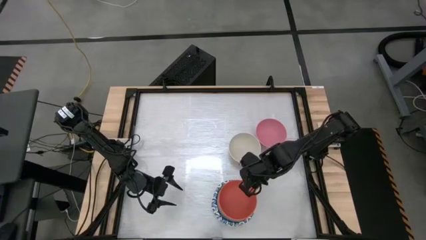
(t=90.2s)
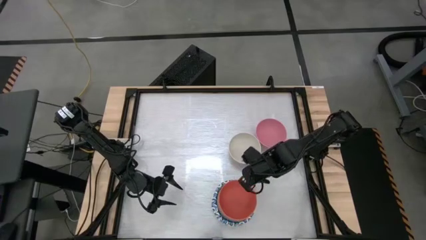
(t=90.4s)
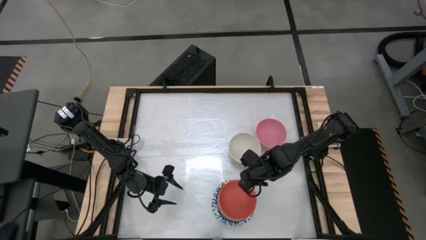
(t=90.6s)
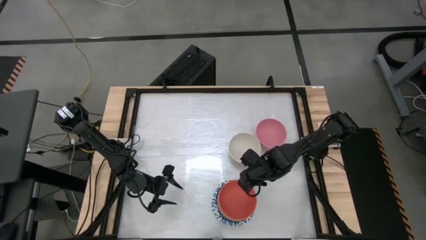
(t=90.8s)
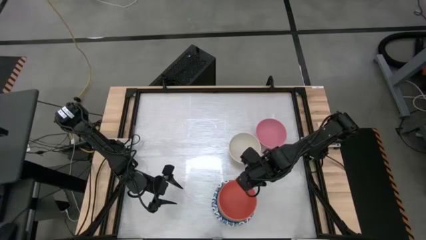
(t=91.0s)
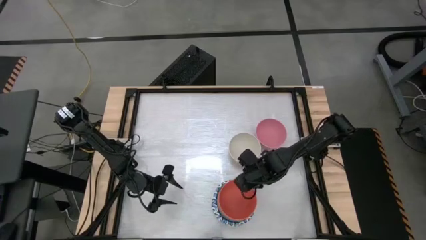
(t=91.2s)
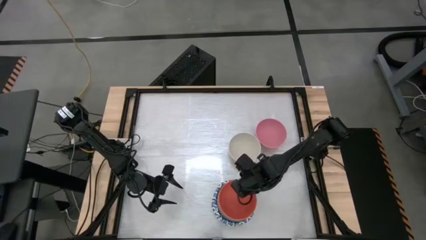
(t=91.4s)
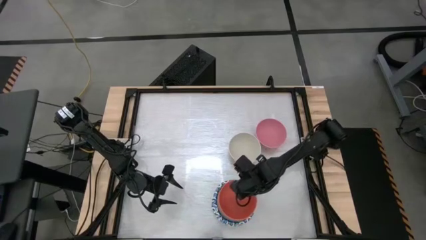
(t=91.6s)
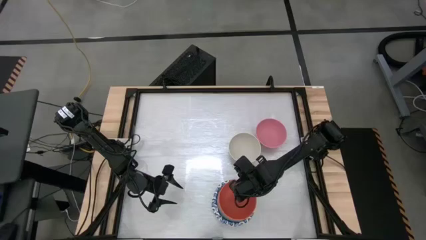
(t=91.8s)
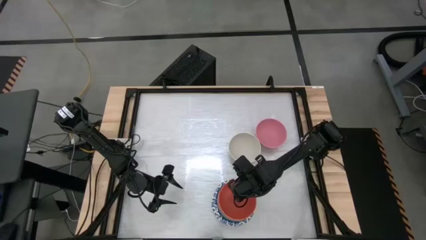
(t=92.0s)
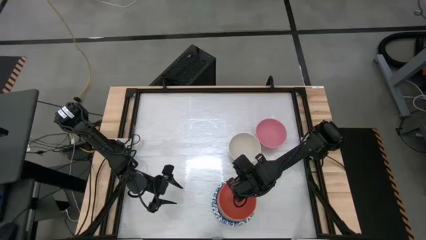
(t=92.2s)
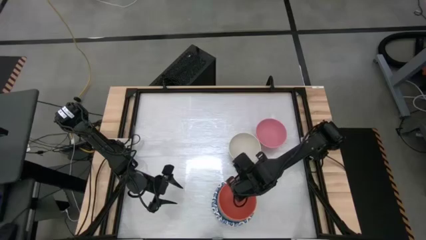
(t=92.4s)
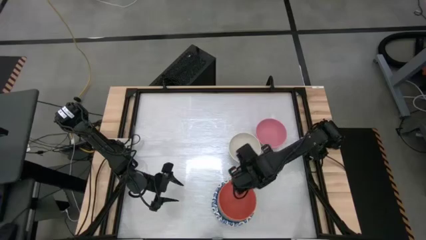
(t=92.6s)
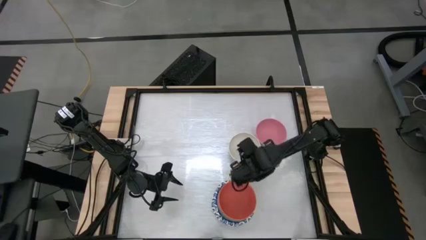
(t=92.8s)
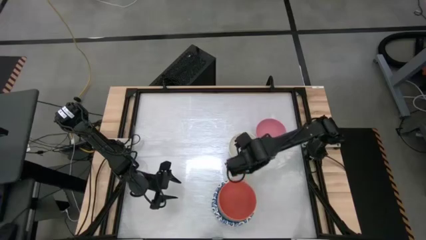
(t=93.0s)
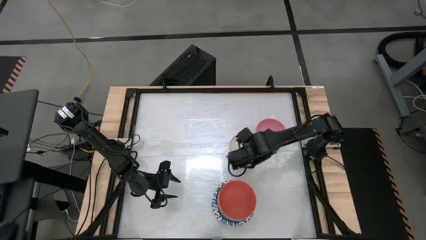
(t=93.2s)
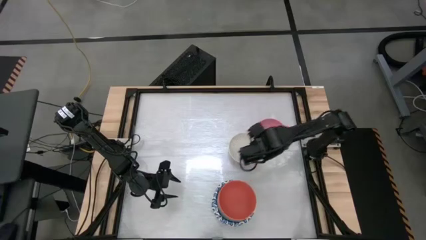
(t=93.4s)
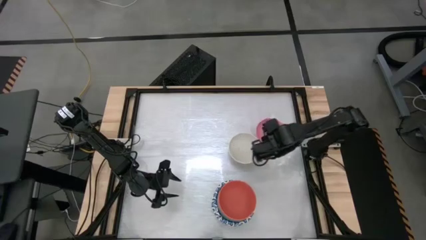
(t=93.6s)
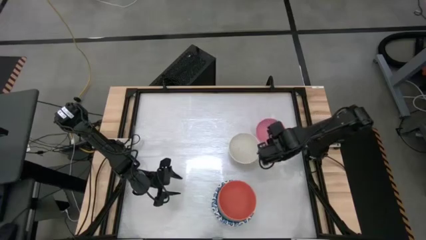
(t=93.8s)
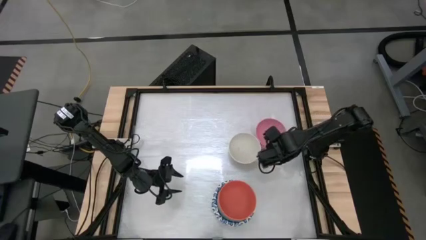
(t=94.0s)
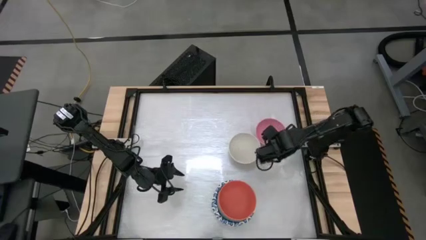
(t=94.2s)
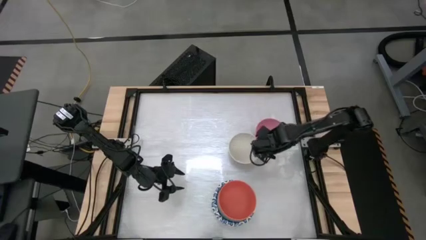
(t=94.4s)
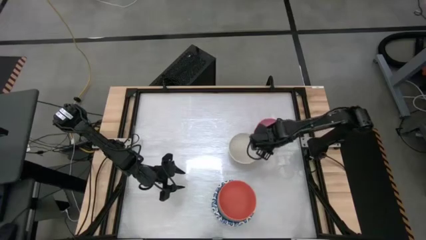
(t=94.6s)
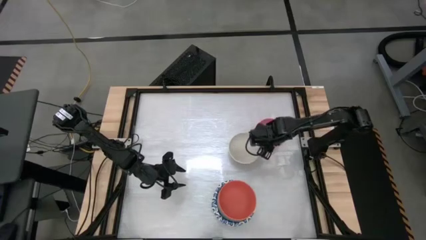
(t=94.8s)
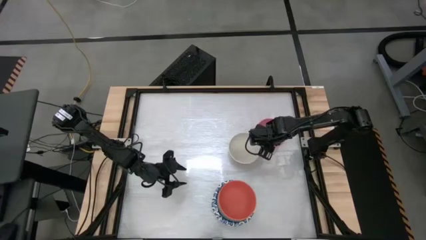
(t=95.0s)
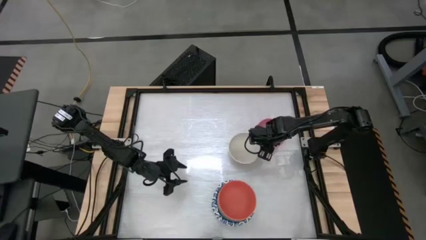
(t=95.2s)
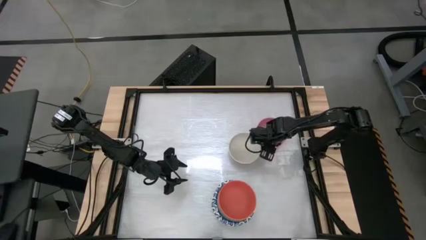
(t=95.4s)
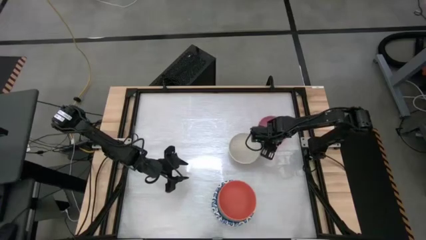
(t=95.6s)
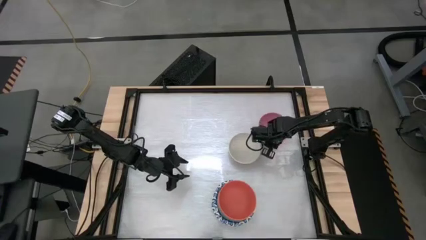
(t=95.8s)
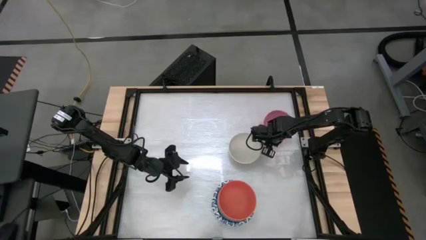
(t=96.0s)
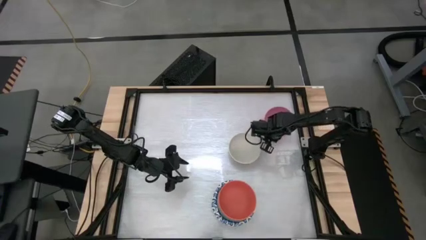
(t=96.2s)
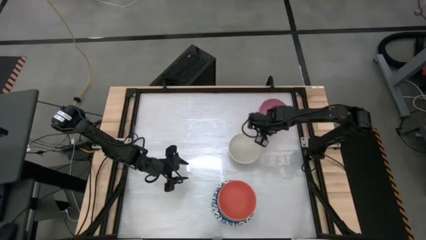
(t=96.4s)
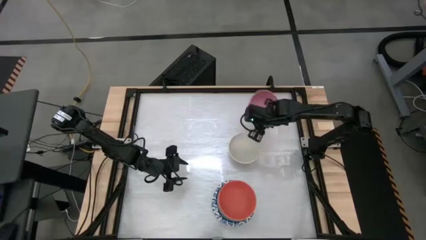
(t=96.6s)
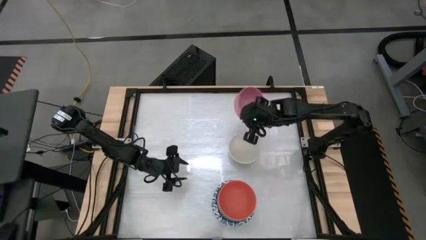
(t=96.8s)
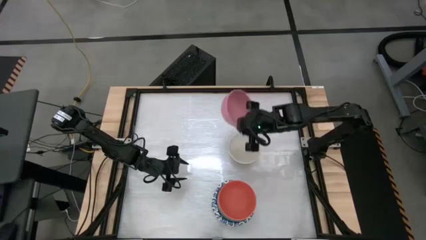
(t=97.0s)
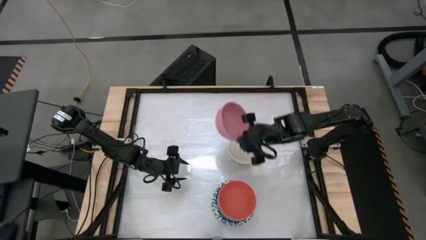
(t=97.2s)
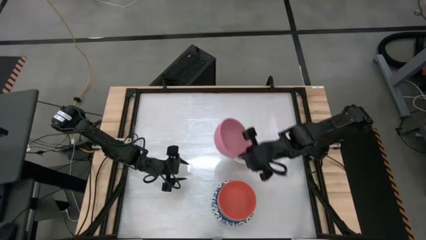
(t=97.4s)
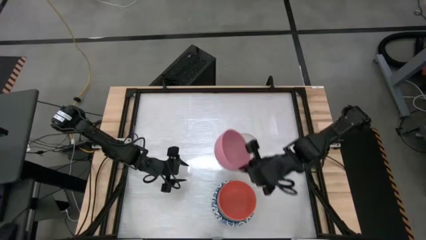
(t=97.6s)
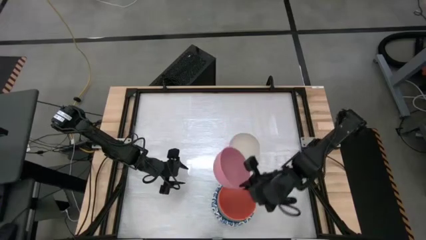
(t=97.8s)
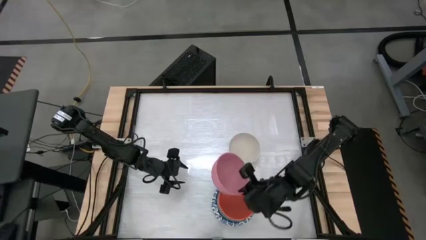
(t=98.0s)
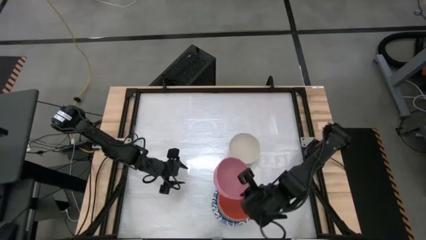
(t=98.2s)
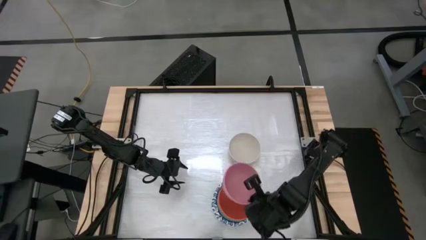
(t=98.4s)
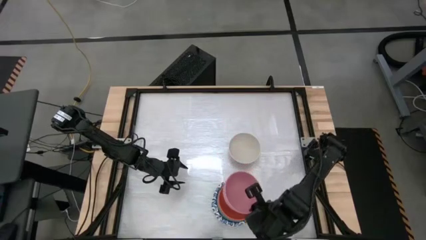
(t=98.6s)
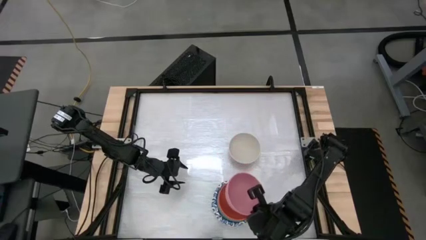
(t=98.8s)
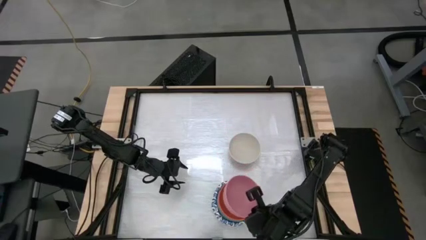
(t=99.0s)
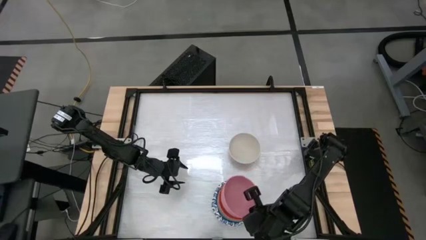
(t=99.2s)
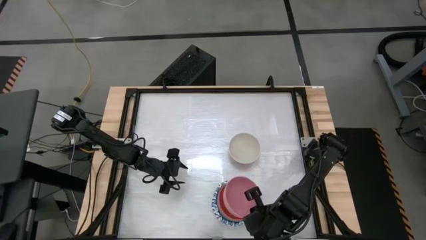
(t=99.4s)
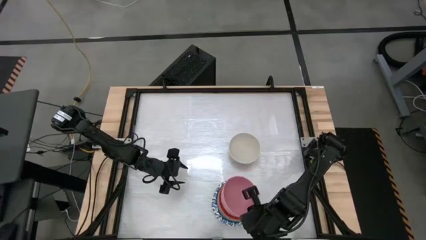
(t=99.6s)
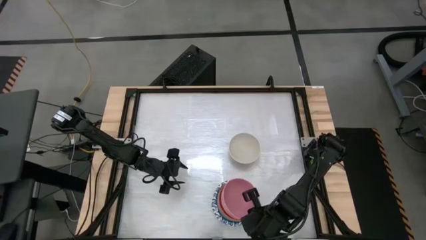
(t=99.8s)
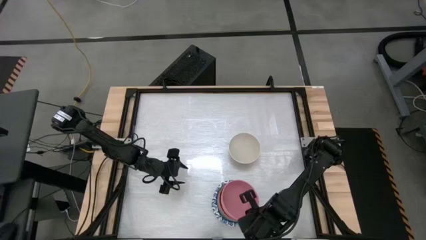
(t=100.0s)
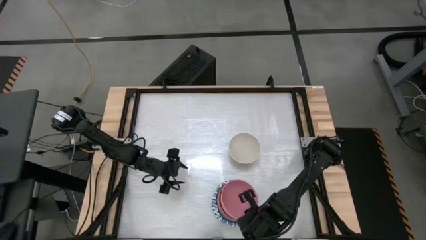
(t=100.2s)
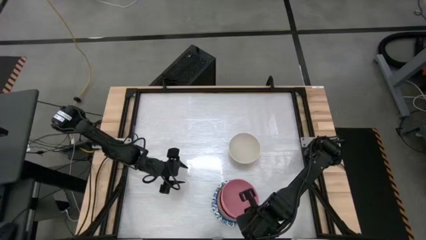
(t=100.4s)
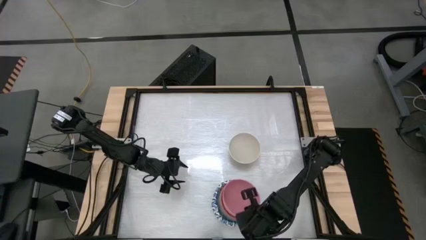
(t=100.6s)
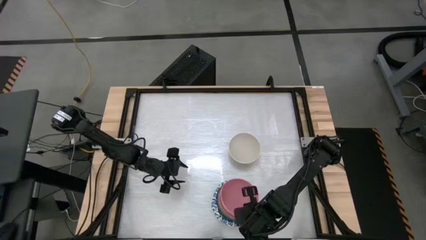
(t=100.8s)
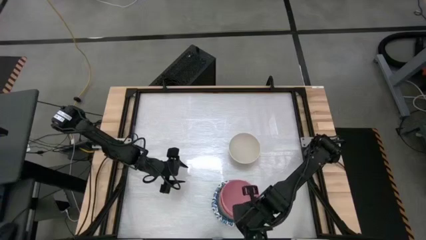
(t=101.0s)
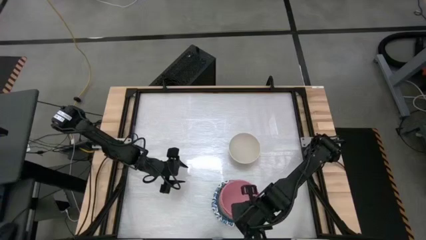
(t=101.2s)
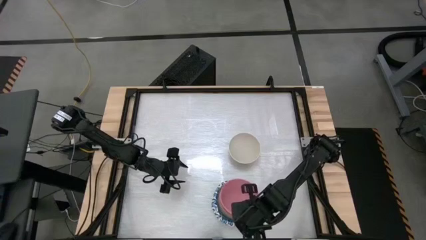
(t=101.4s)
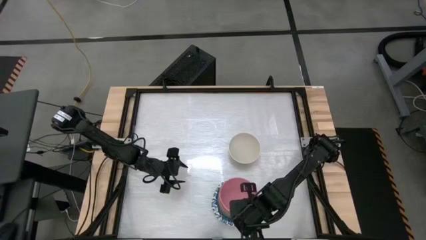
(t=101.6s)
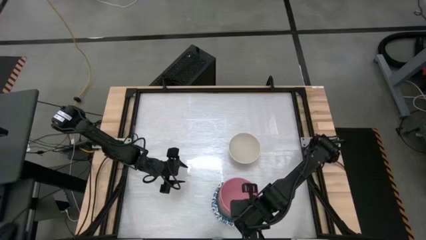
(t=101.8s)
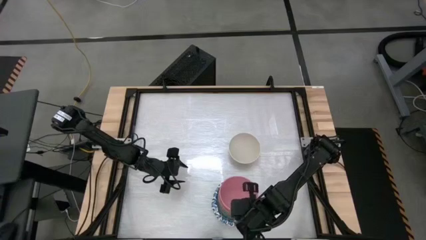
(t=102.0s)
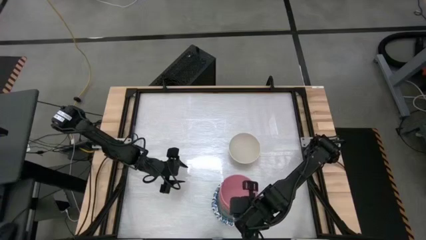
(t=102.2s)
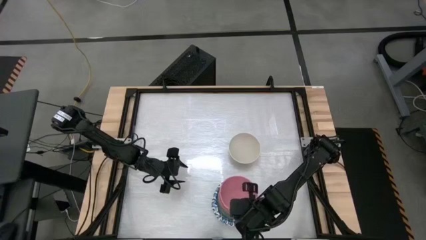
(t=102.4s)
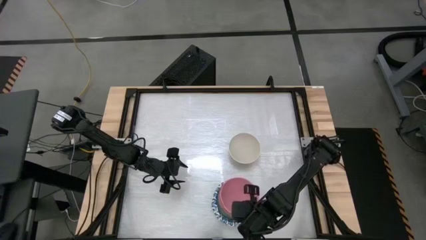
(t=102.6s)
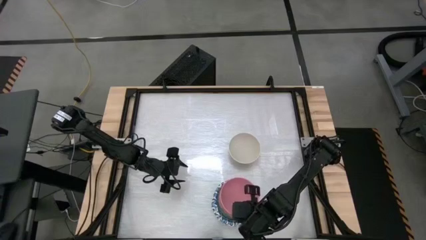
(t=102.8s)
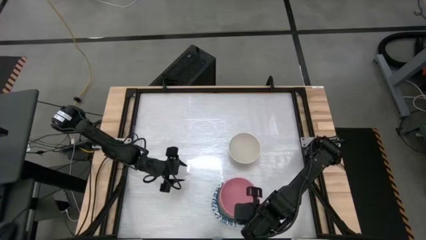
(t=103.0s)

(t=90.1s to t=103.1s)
Stack the pink bowl into the orange bowl
